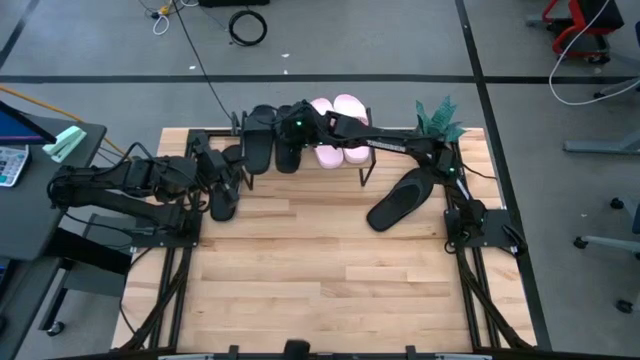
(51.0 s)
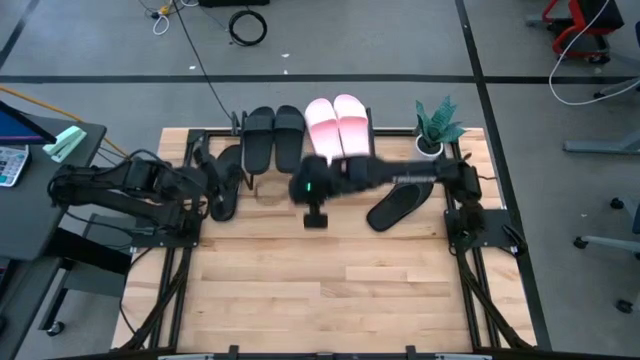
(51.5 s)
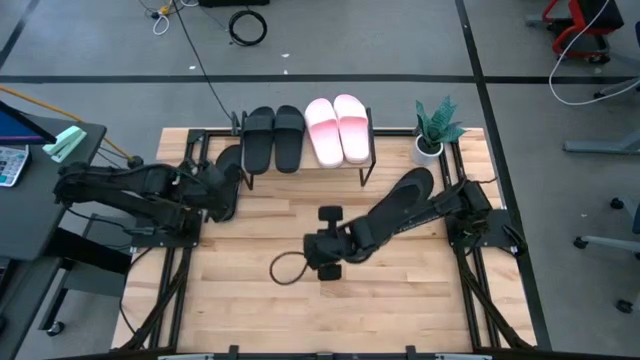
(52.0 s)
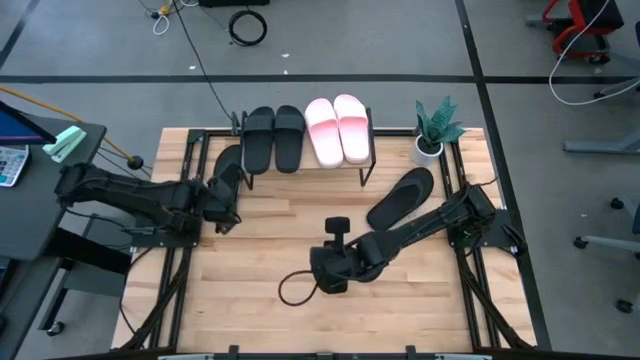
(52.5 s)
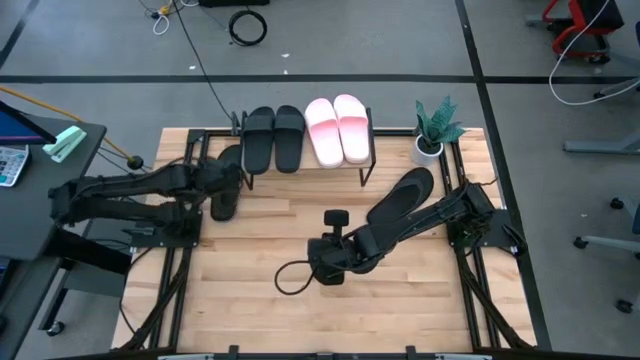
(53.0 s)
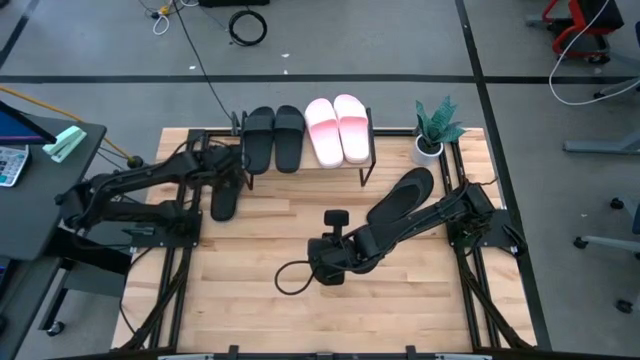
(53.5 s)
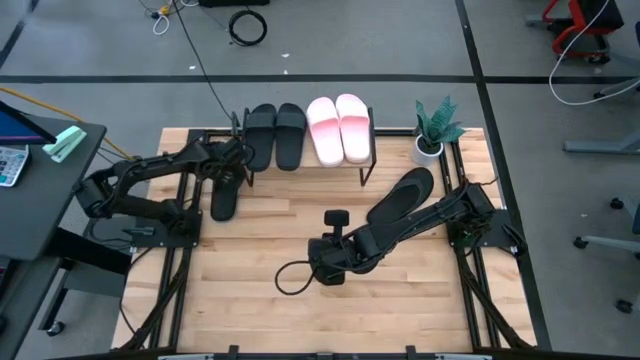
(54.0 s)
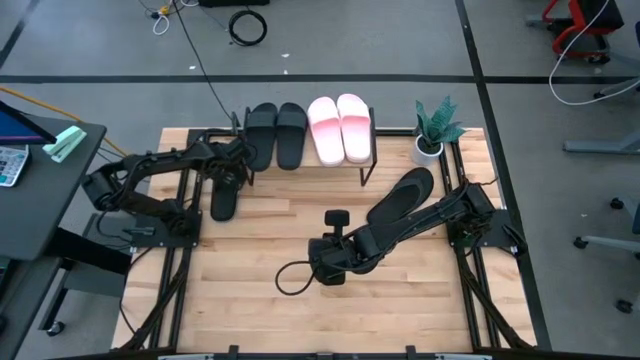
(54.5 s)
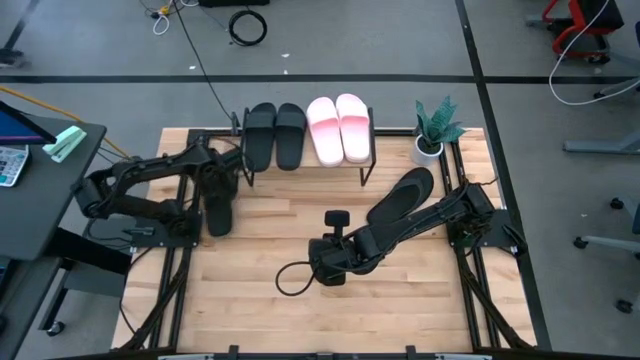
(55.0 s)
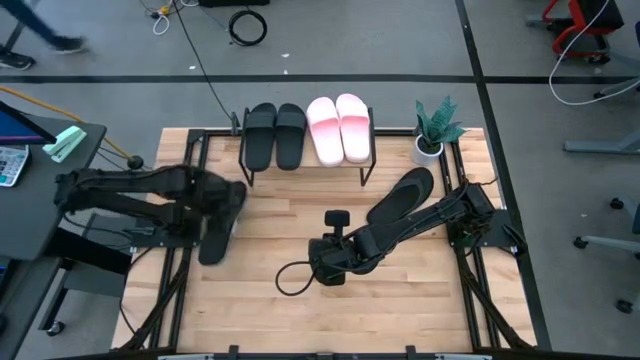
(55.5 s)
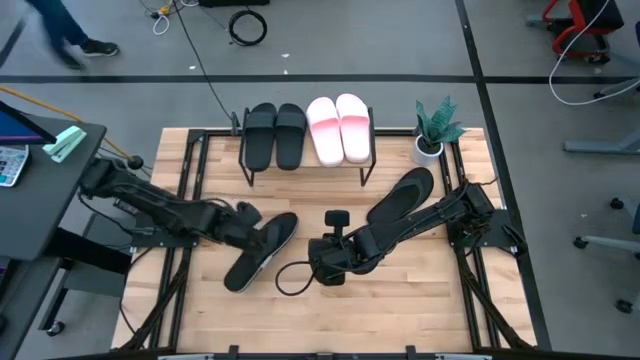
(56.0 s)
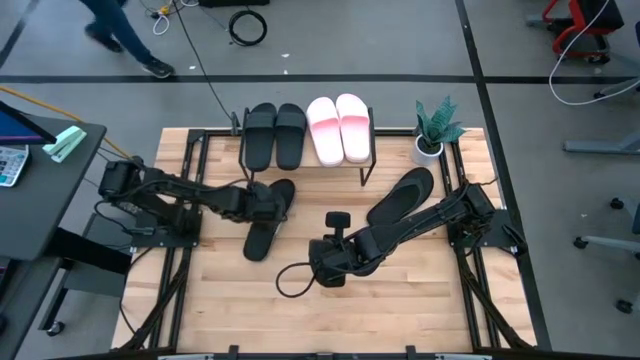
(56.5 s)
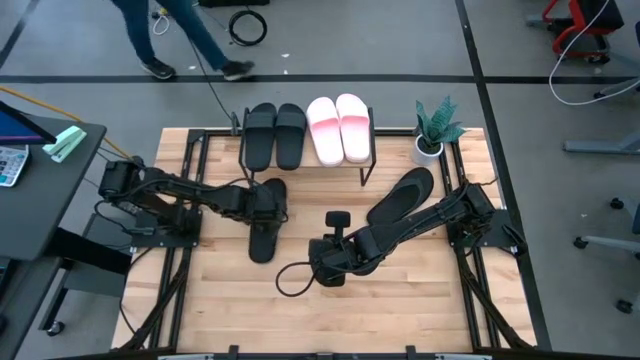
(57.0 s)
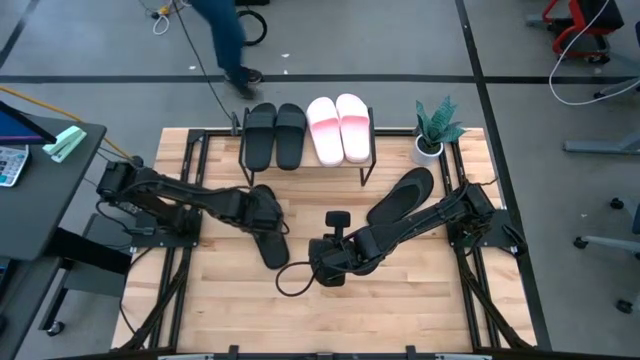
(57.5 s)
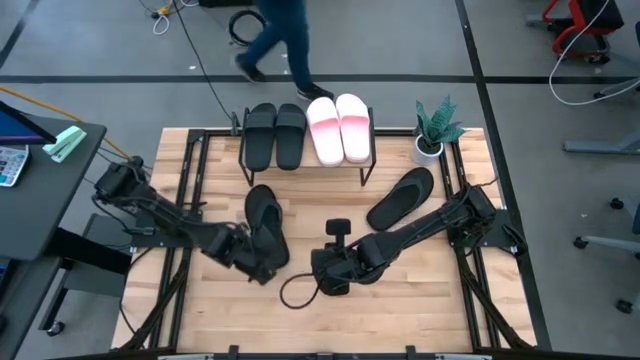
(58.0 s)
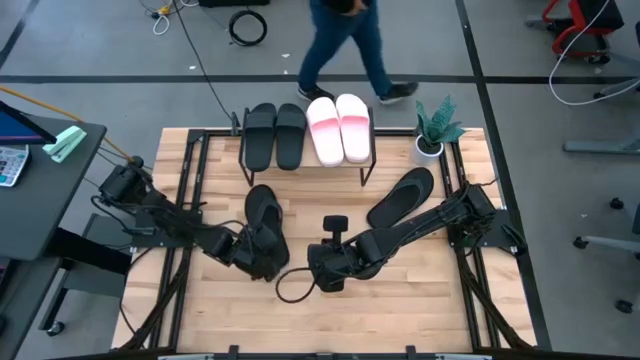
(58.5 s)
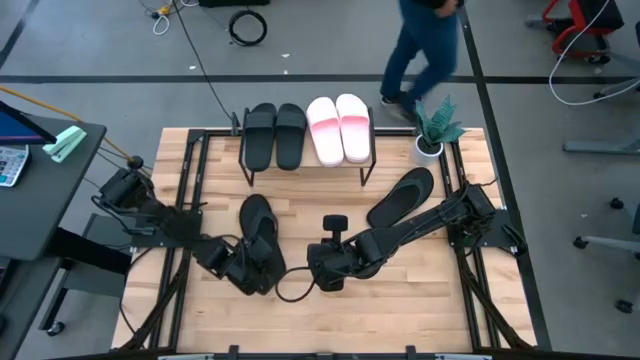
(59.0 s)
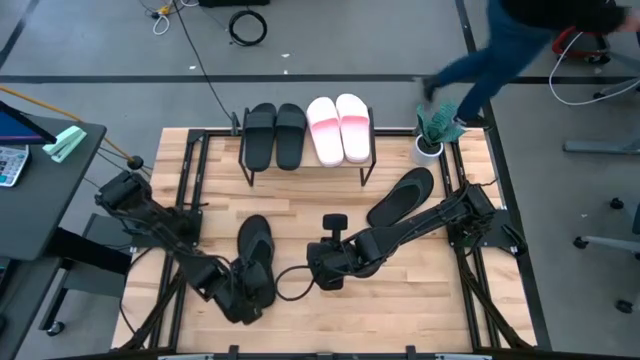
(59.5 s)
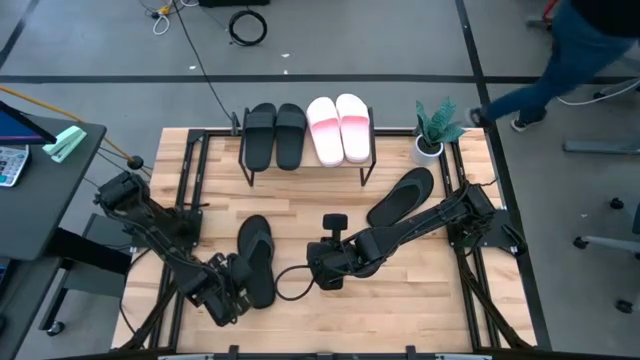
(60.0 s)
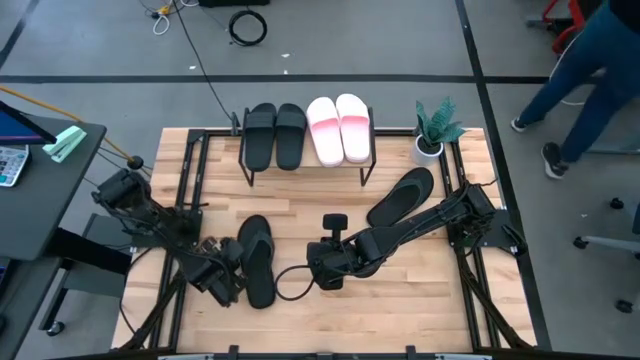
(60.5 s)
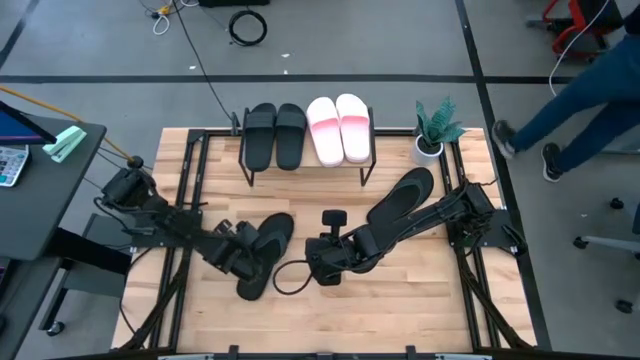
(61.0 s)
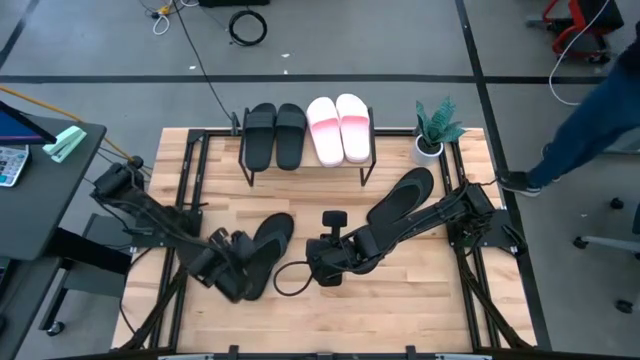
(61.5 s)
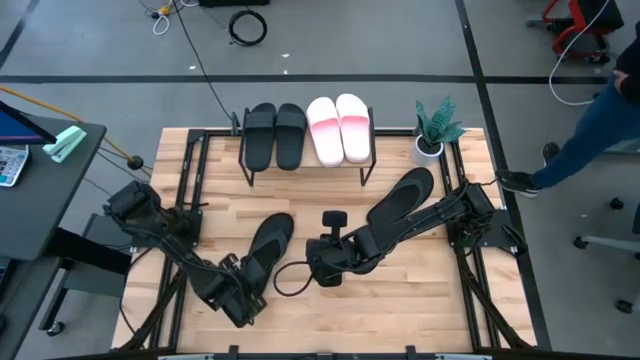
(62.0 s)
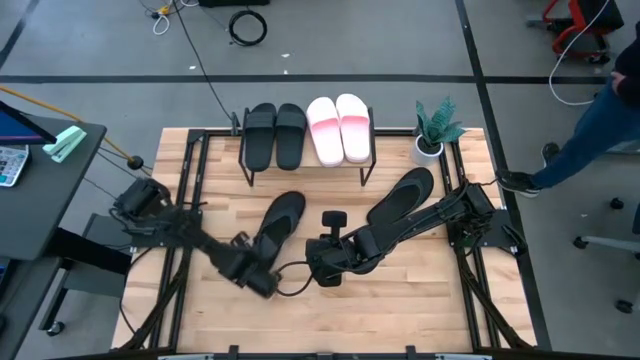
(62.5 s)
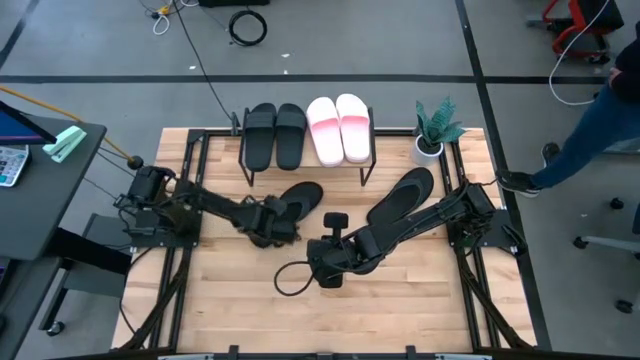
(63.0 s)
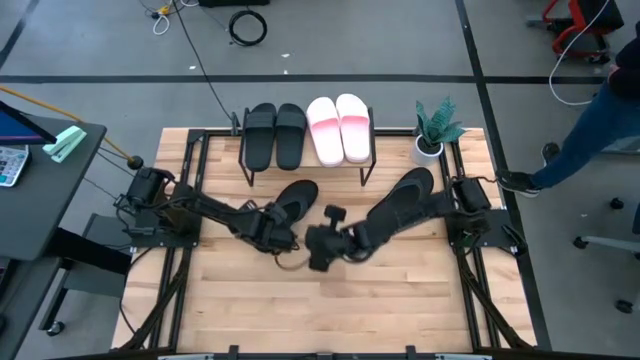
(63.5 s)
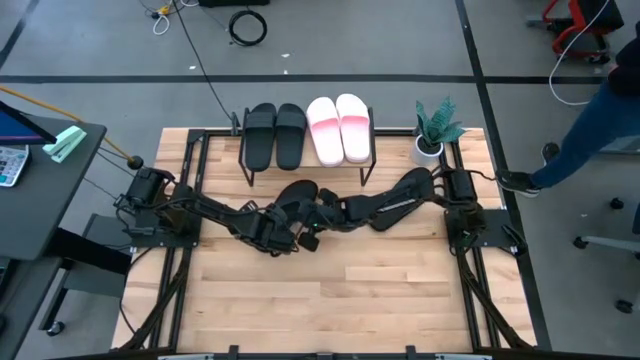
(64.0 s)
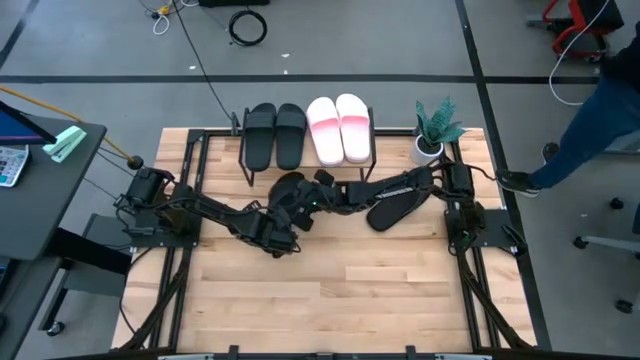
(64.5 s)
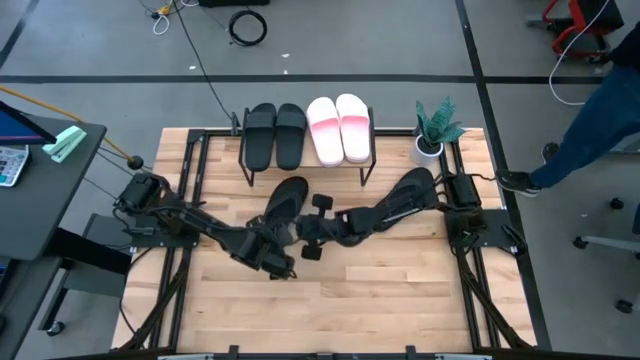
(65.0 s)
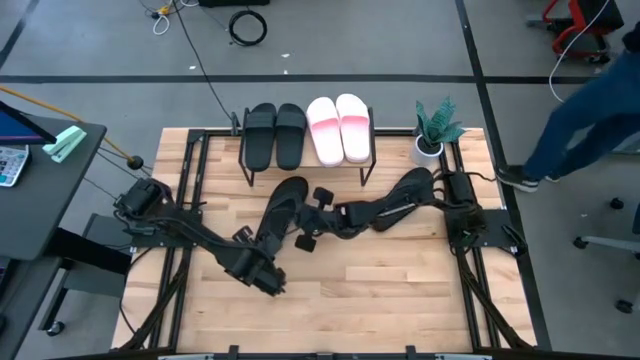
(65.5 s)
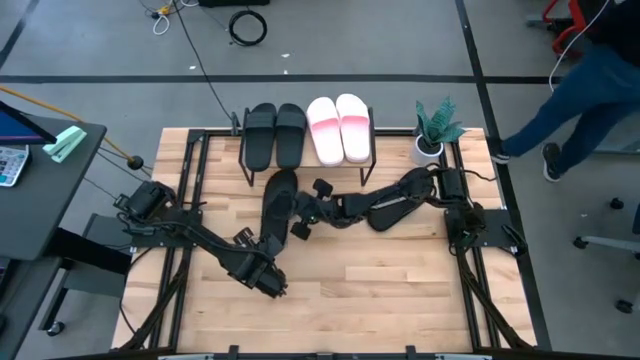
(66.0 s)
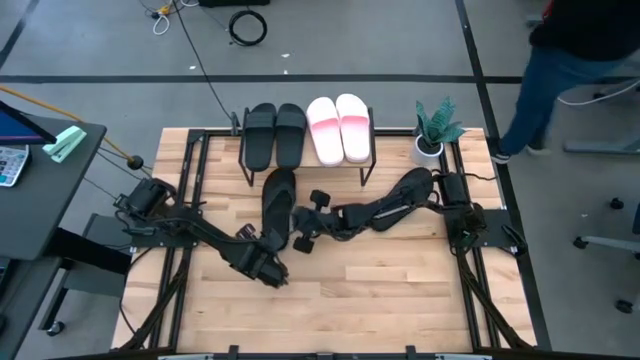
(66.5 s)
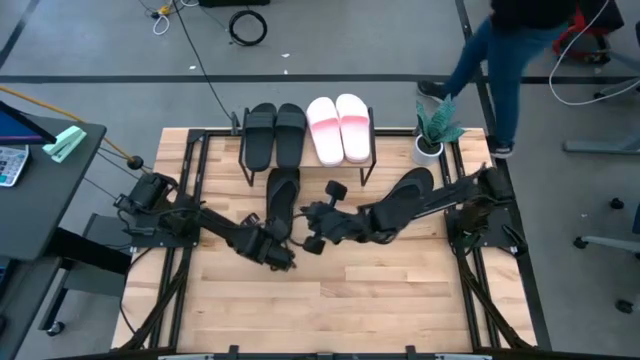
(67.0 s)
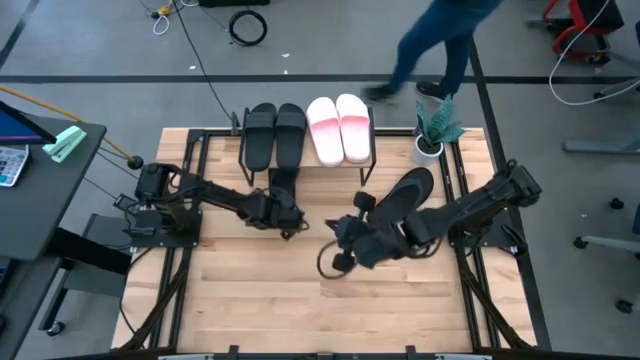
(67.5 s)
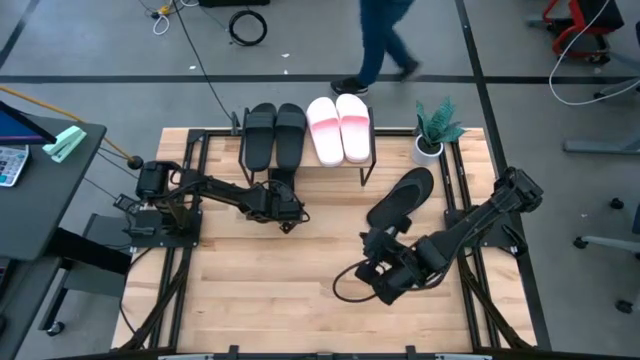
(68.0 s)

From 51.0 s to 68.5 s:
Task: Pick and place slides into the shelf
Move the left black flip flop under the shelf
